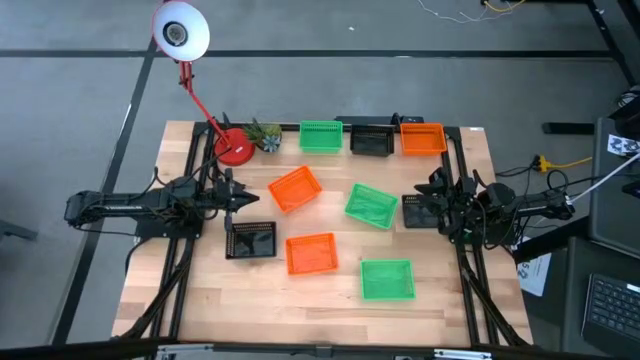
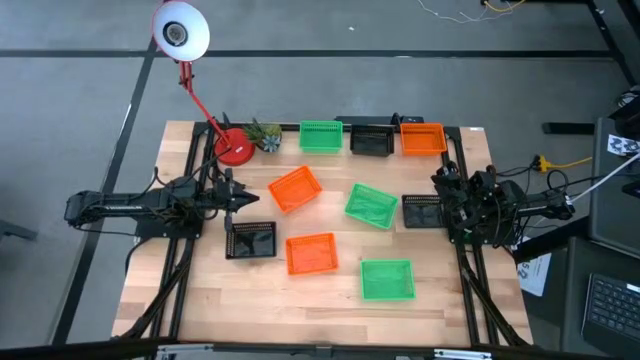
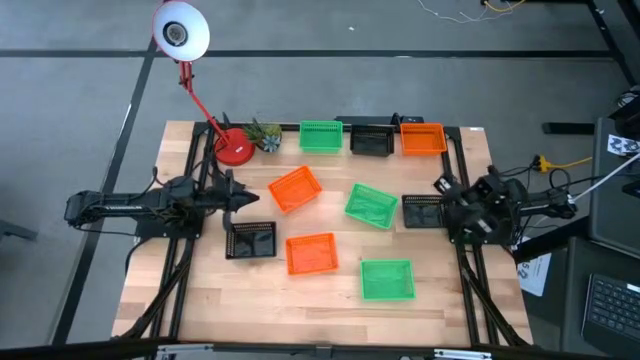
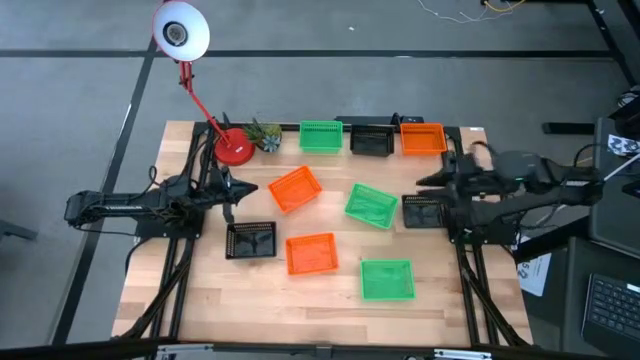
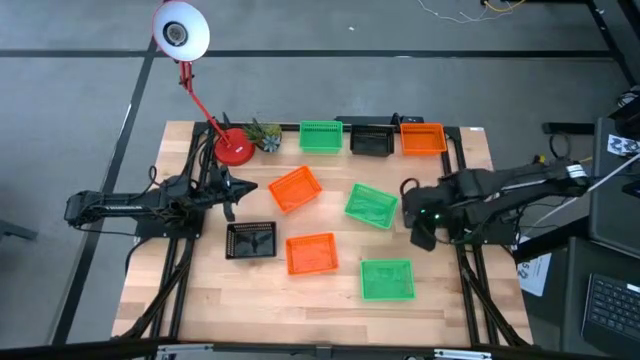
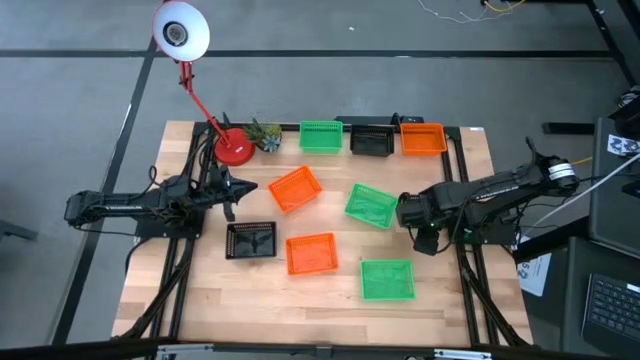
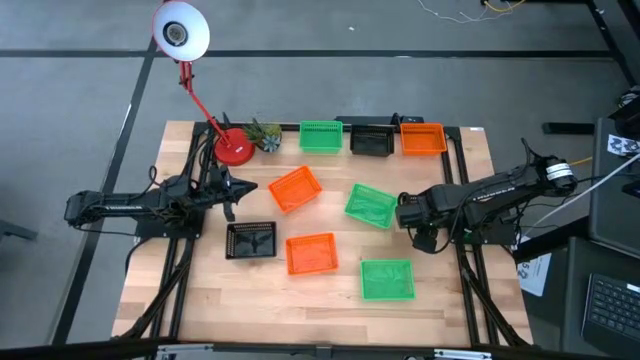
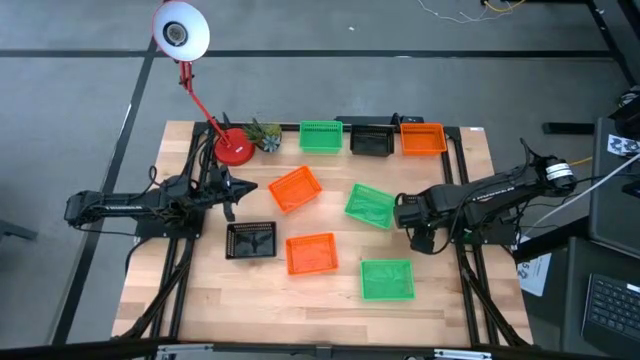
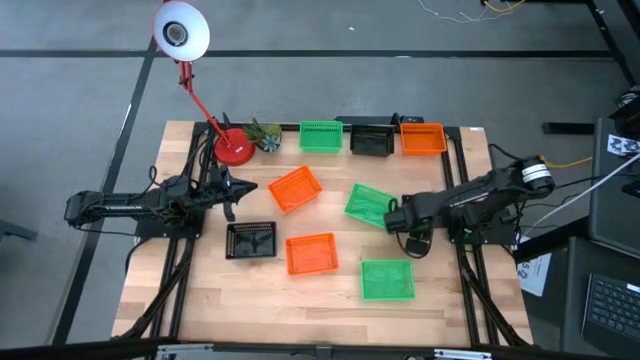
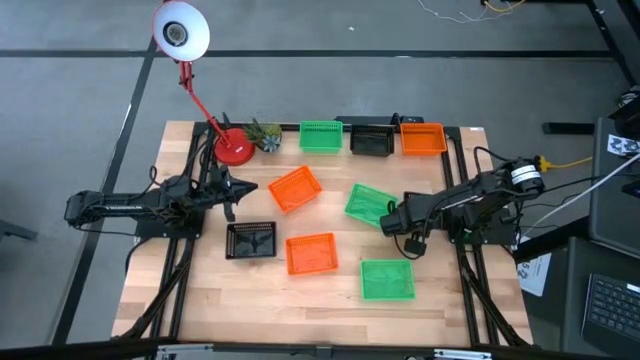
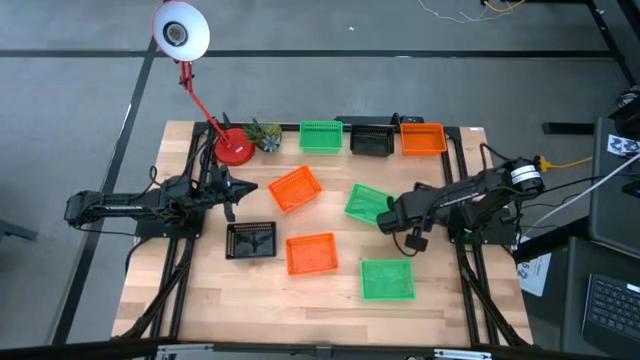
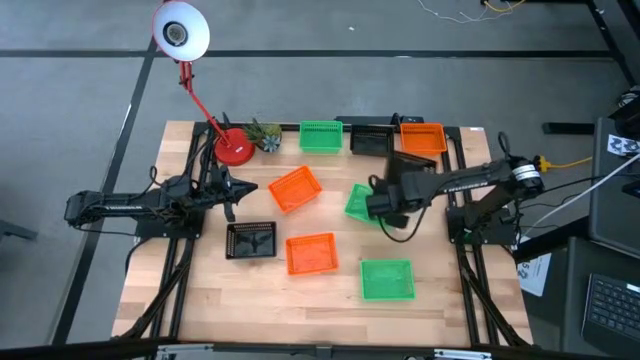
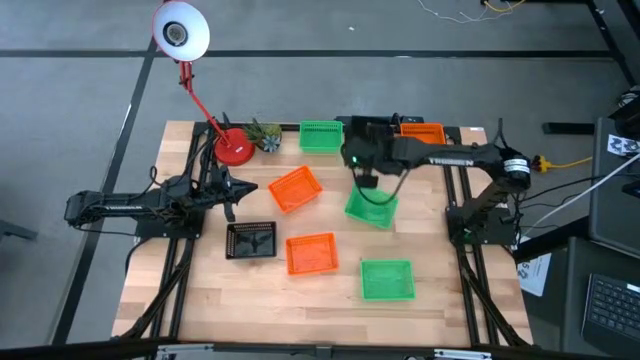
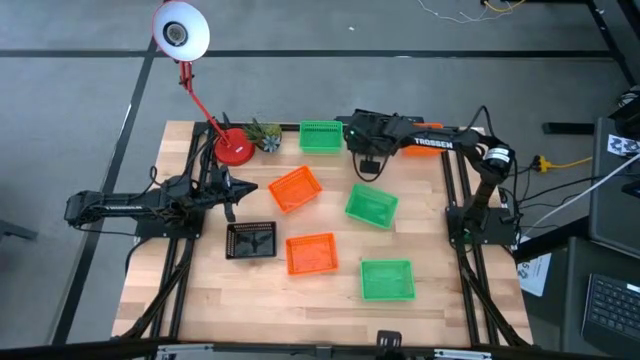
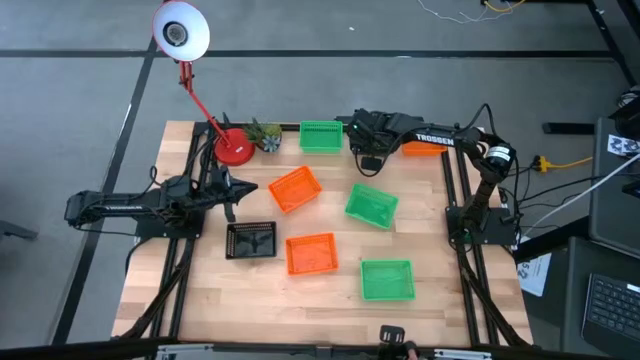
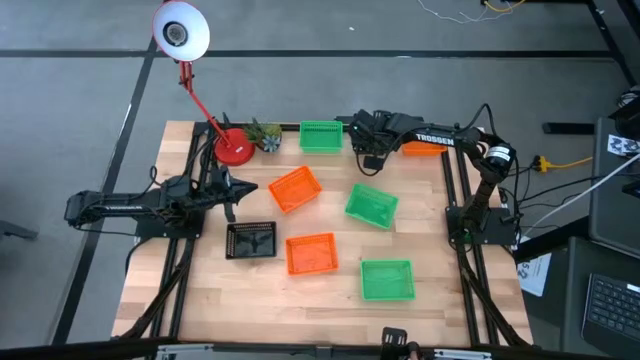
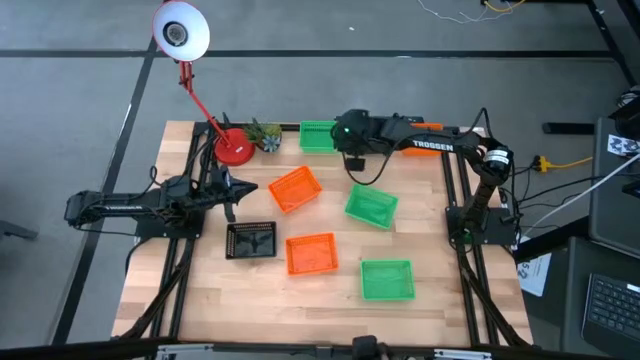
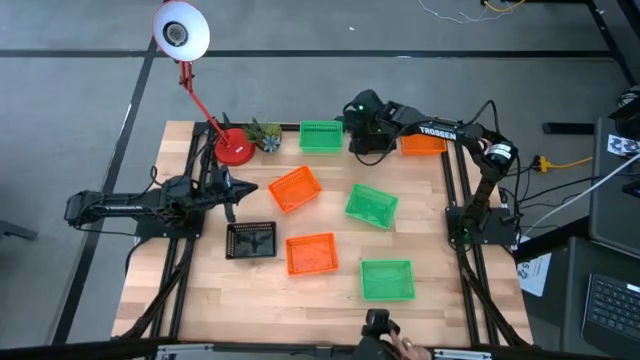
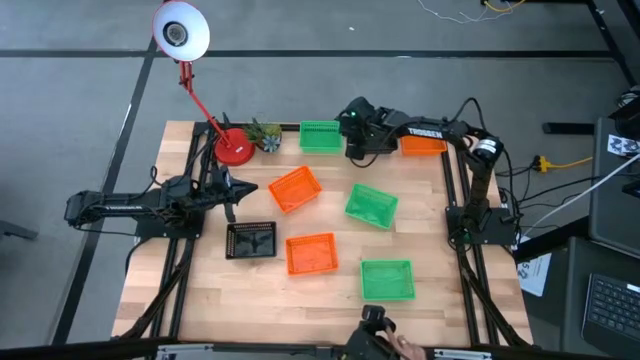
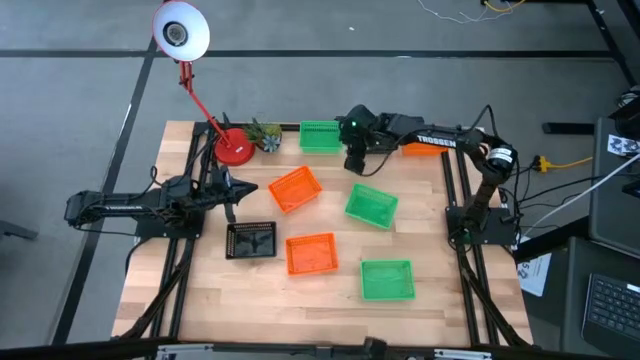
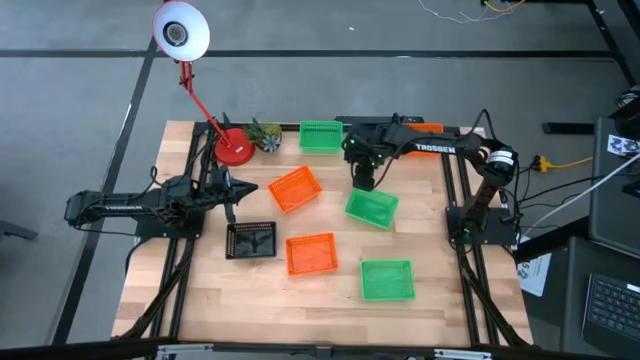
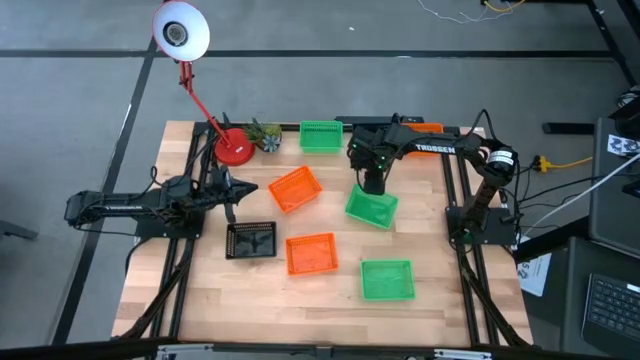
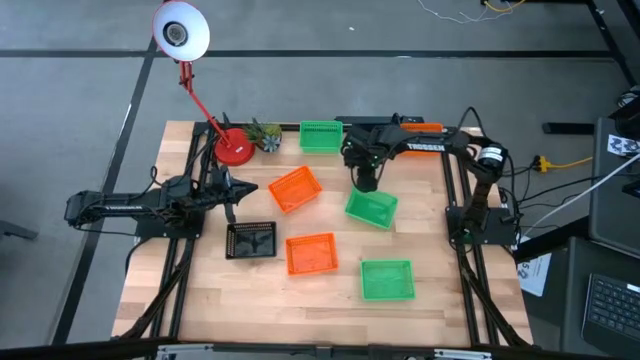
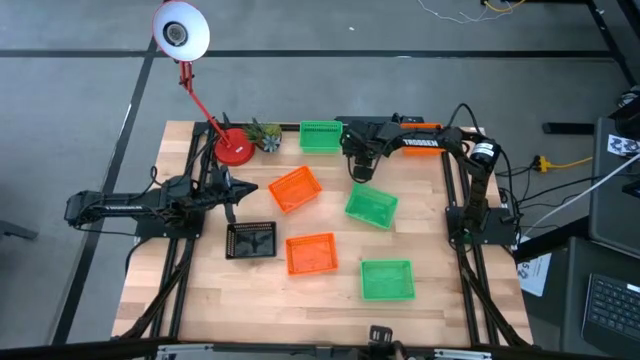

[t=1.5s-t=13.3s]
Stack the middle right black bin on top of the top black bin

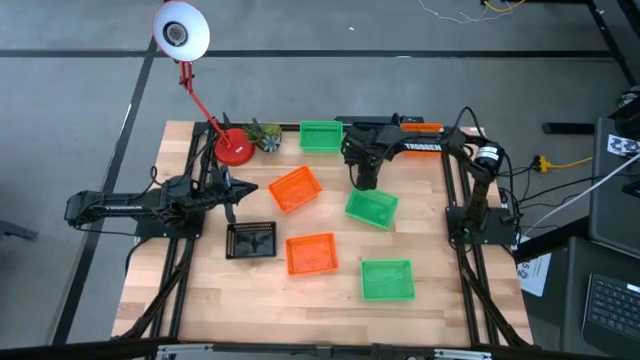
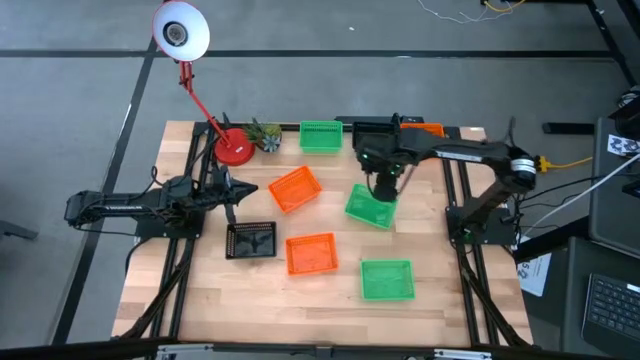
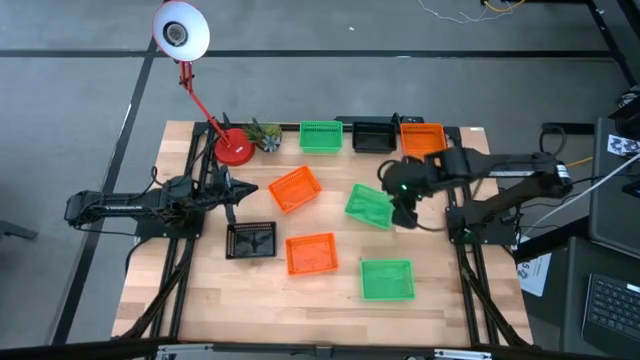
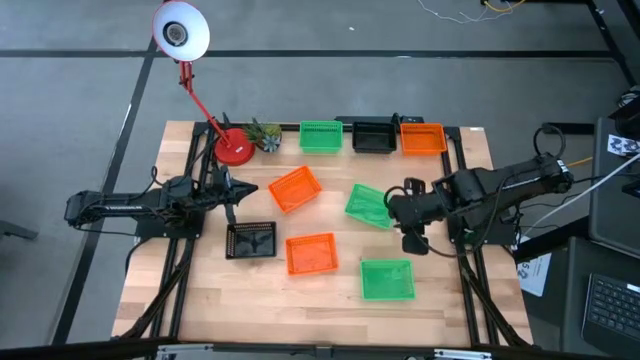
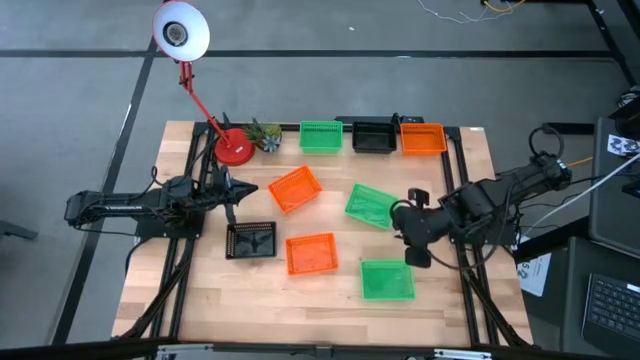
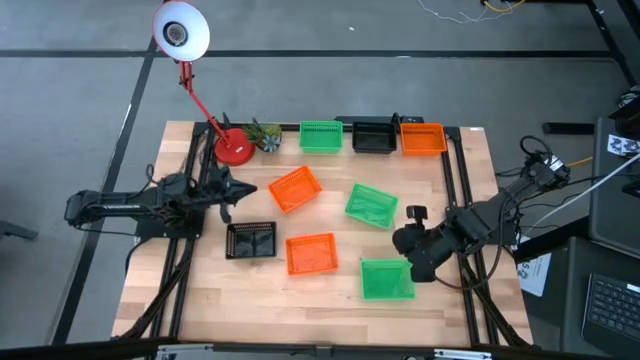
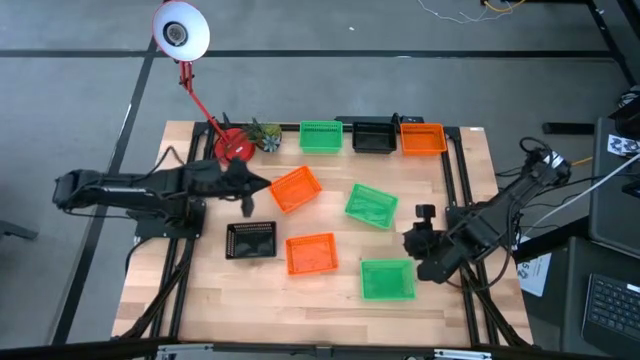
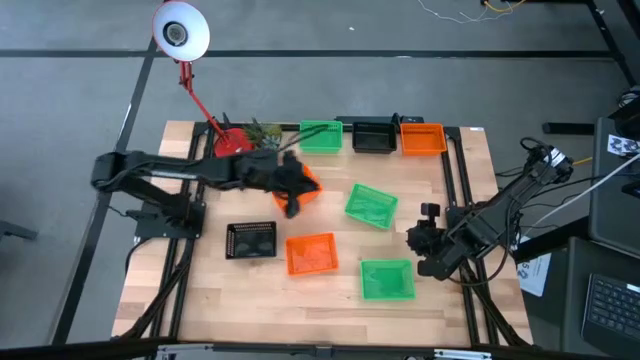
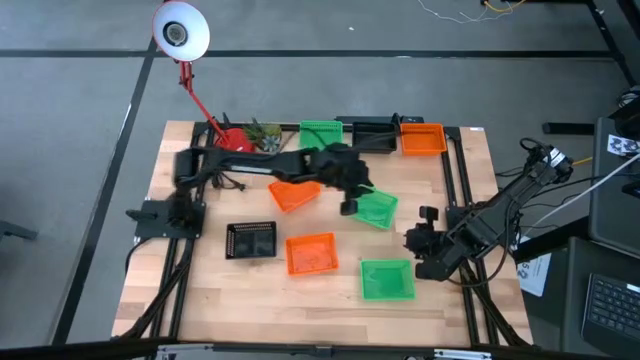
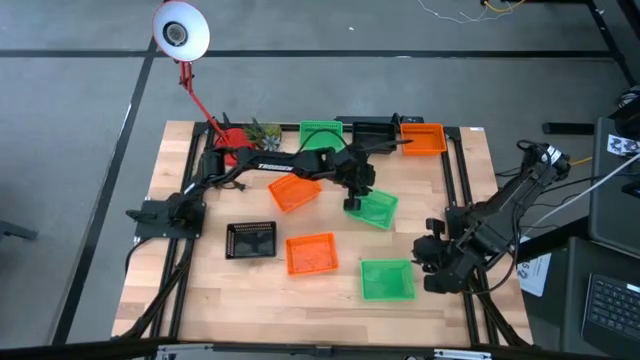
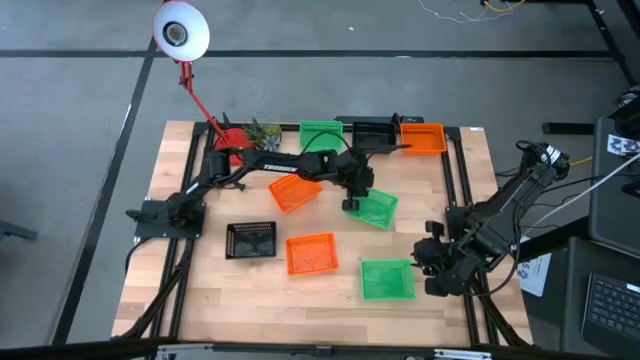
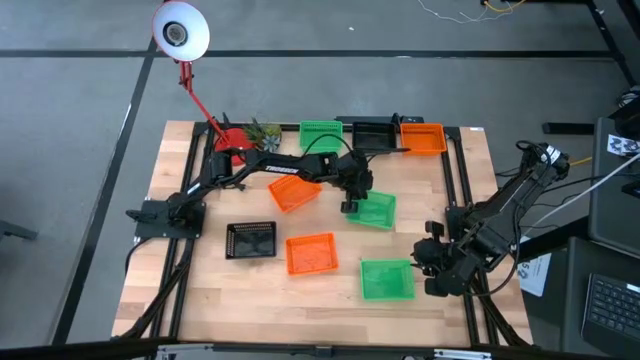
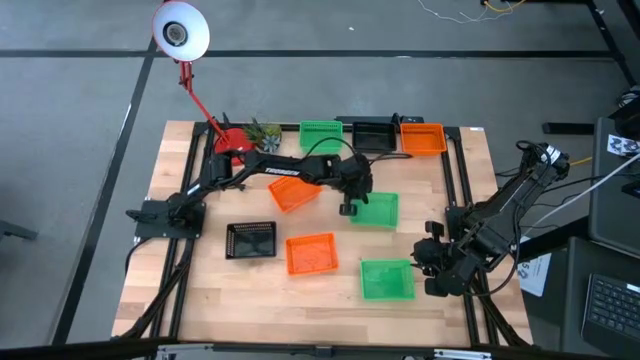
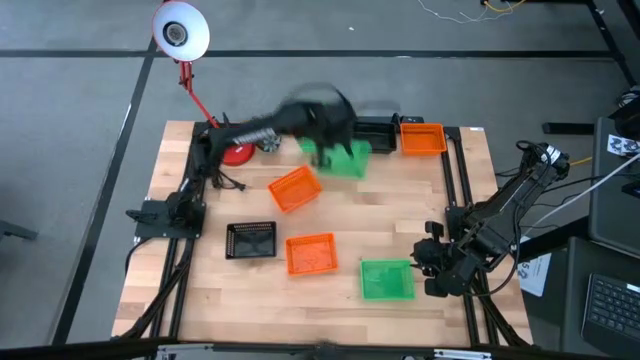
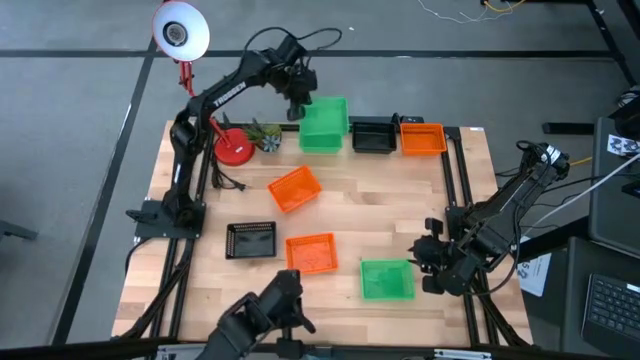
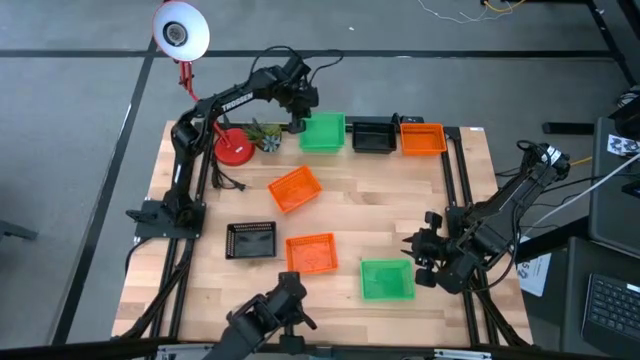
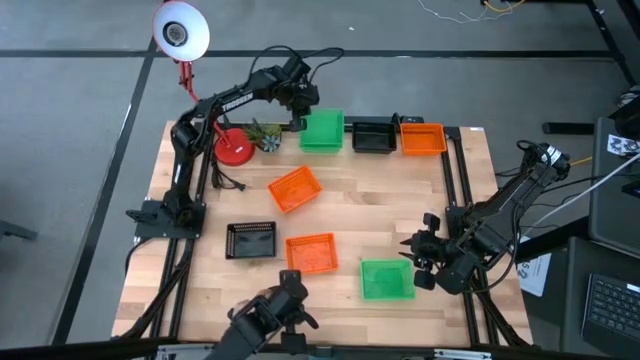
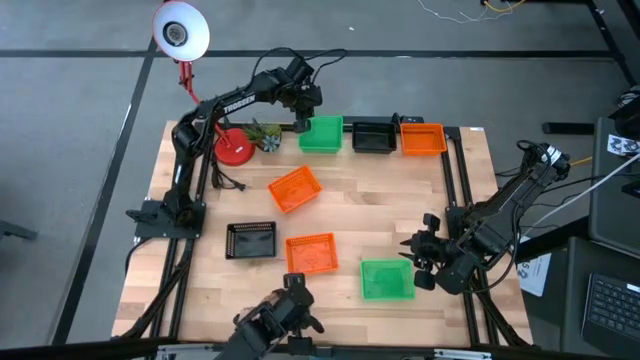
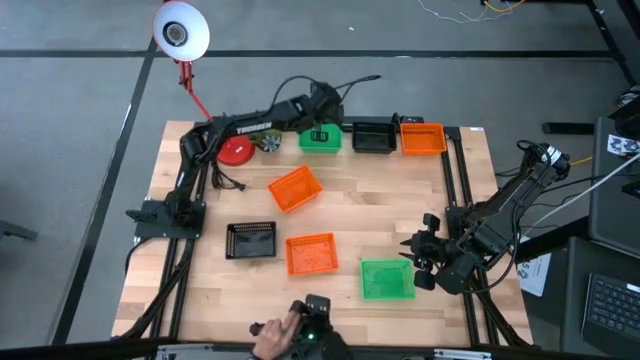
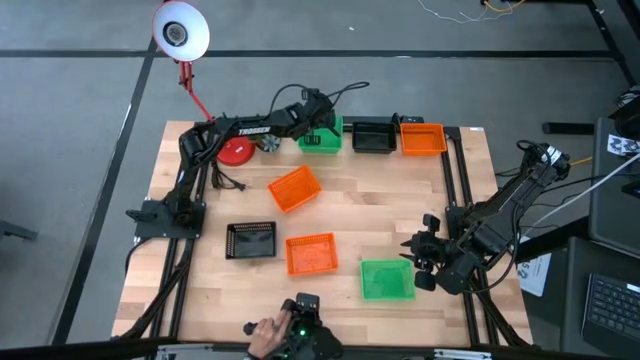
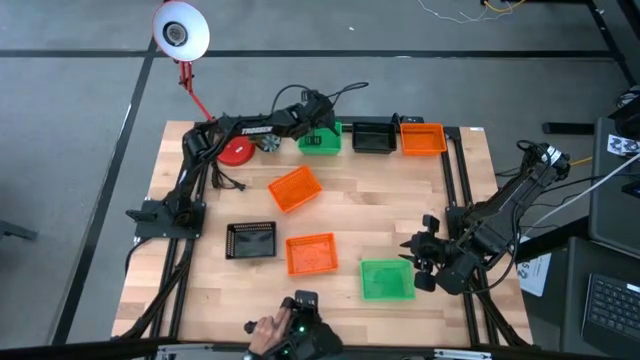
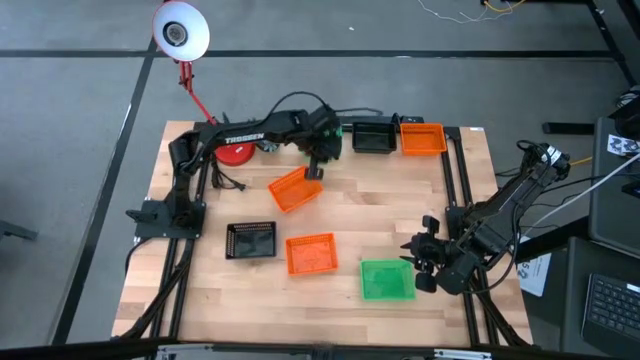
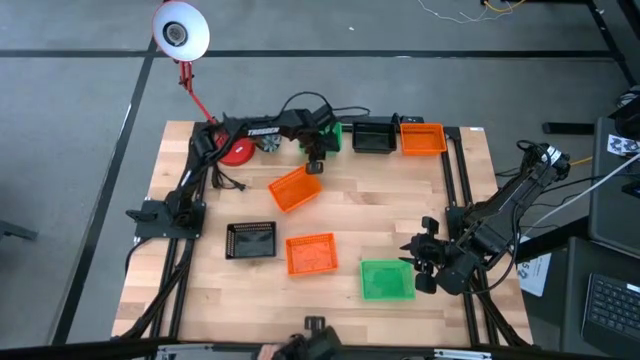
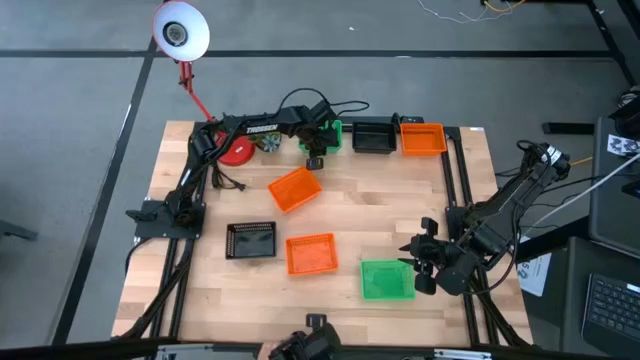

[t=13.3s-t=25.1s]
Stack the middle green bin on top of the top green bin
